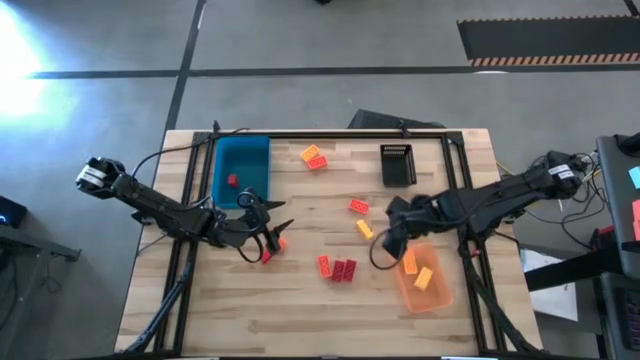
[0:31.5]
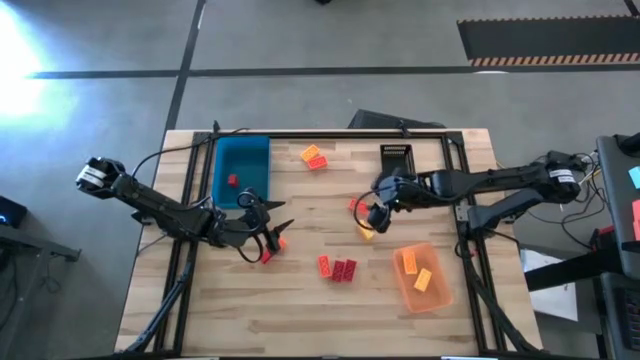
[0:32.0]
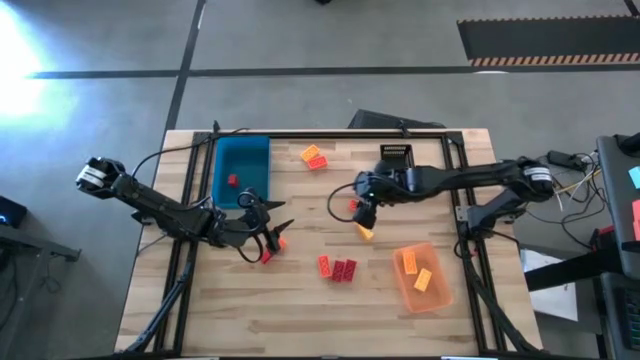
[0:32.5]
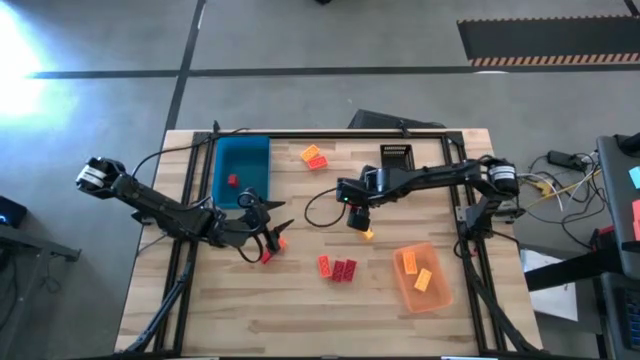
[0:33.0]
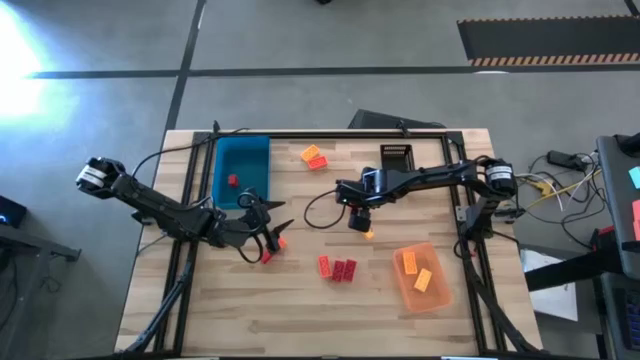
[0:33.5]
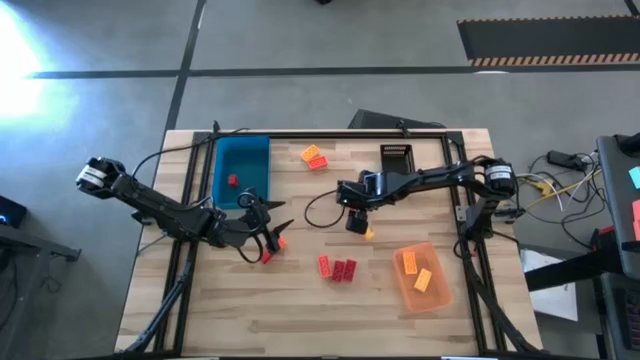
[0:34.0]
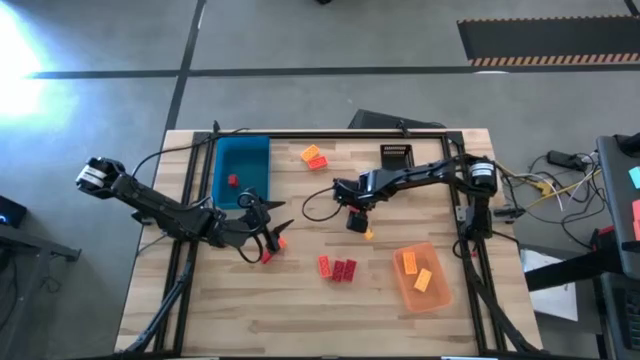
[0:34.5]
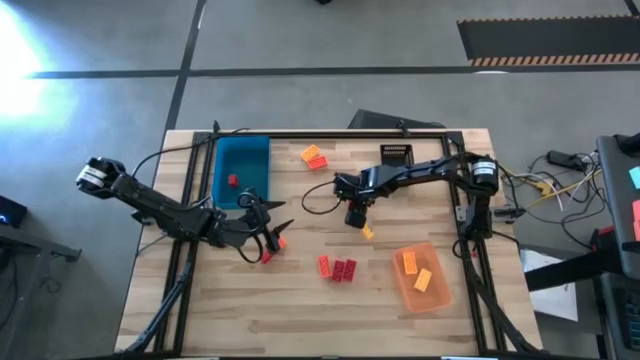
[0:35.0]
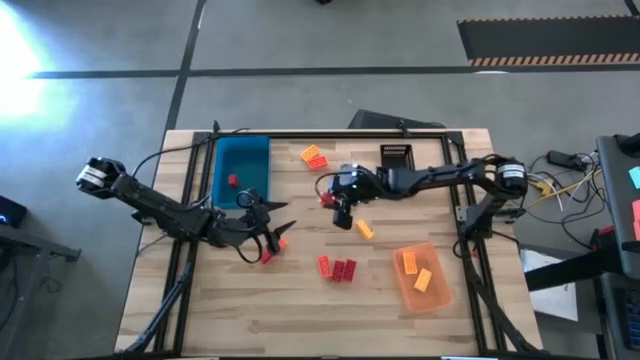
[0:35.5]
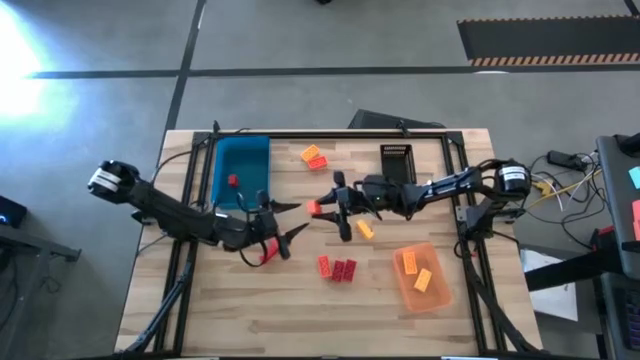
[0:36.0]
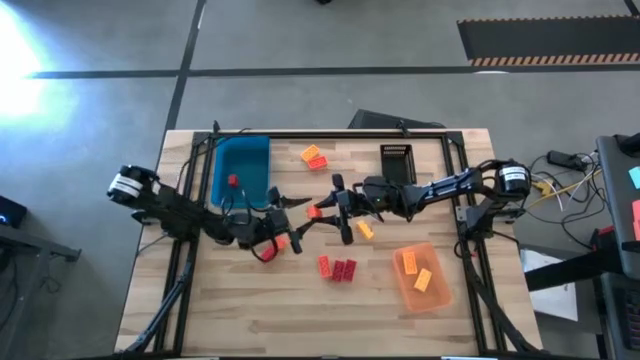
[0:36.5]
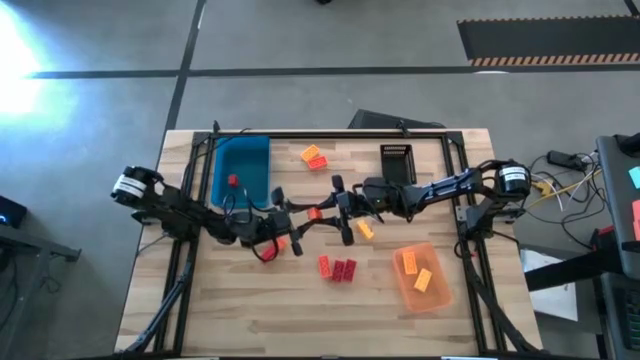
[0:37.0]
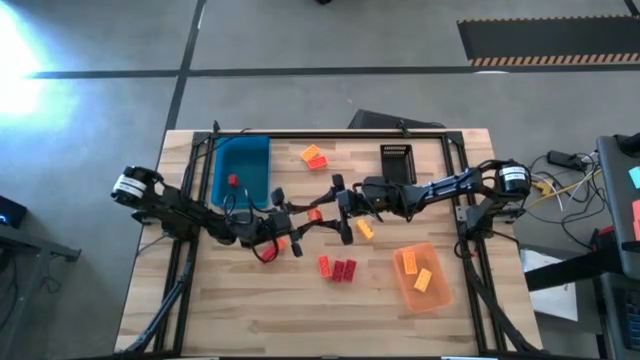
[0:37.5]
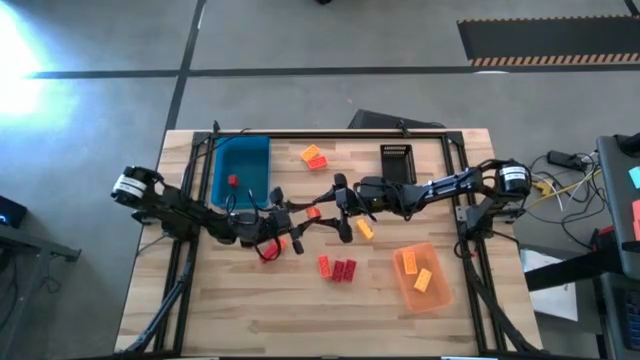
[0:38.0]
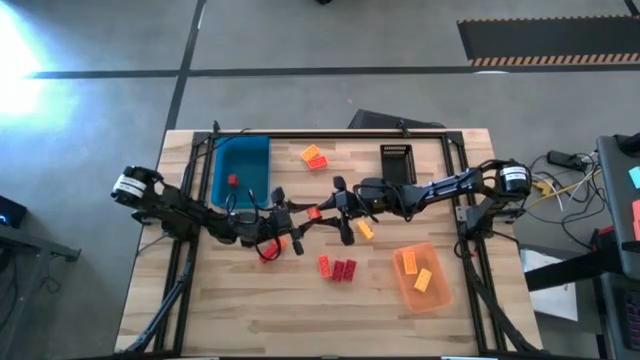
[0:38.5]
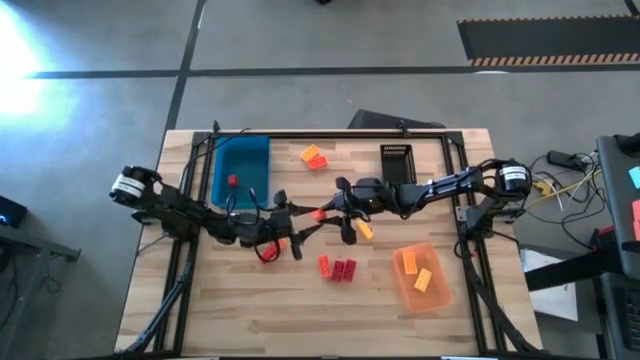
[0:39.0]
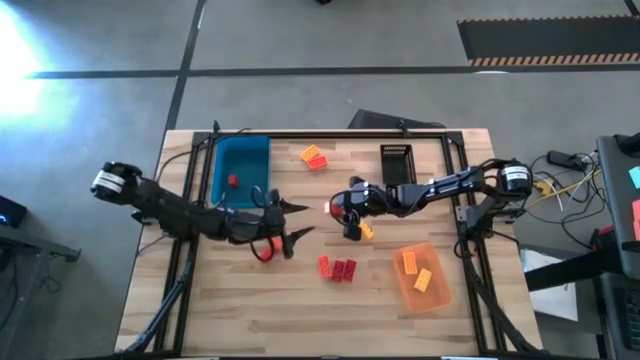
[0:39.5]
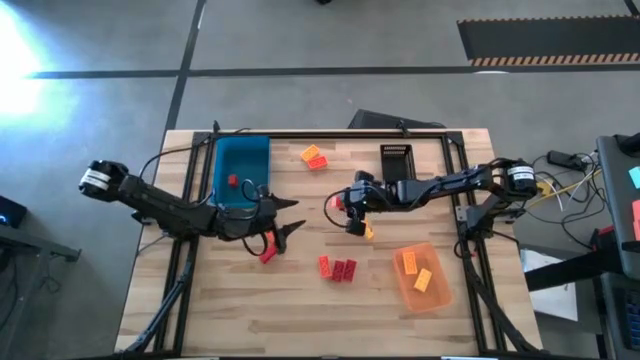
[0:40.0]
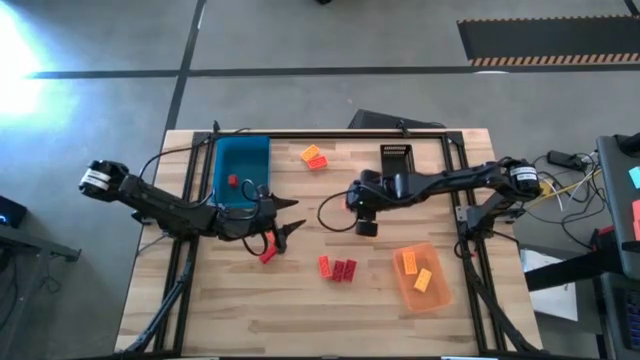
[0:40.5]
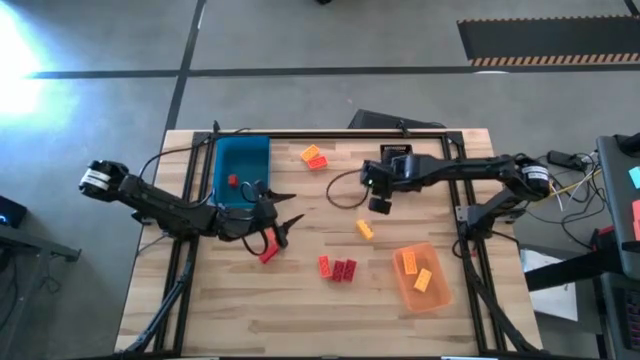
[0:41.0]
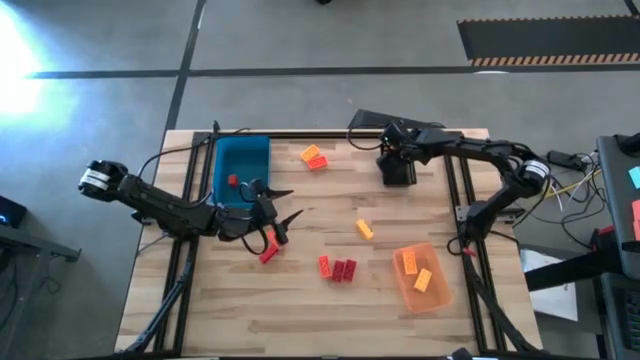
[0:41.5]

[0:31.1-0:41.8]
Task: Sort & place blocks by color
Put the orange game piece into the black bin

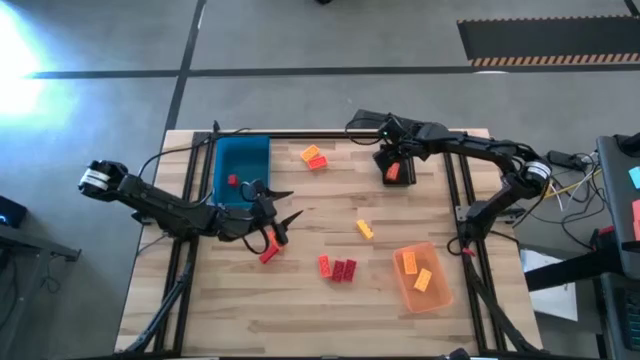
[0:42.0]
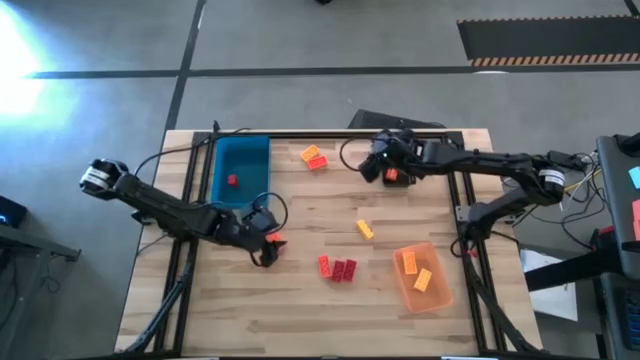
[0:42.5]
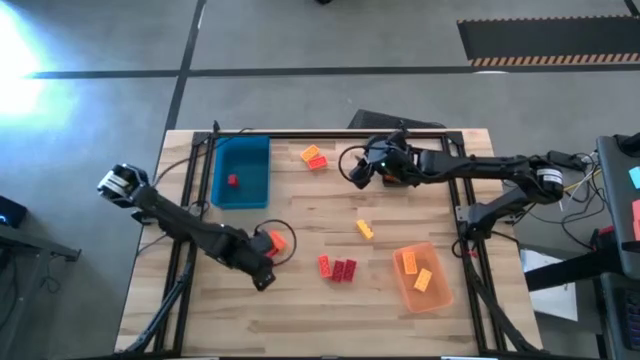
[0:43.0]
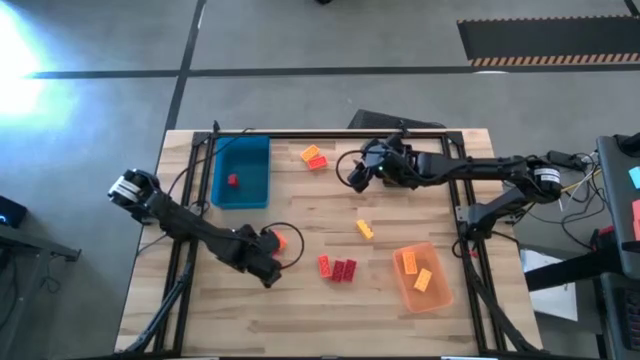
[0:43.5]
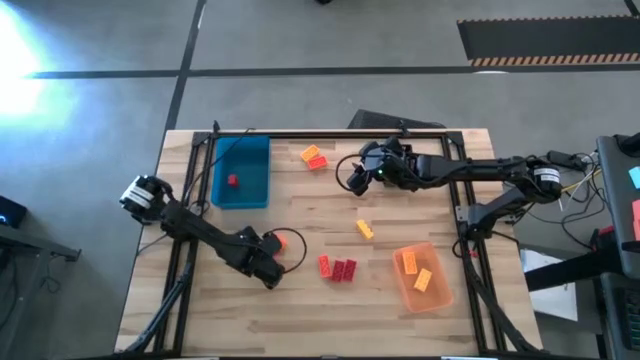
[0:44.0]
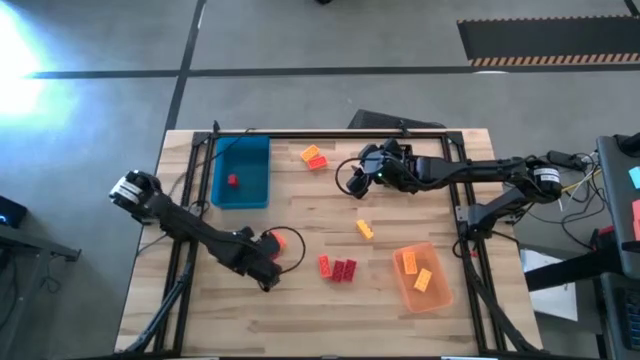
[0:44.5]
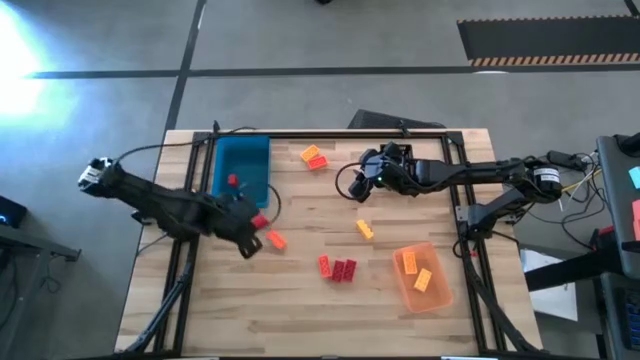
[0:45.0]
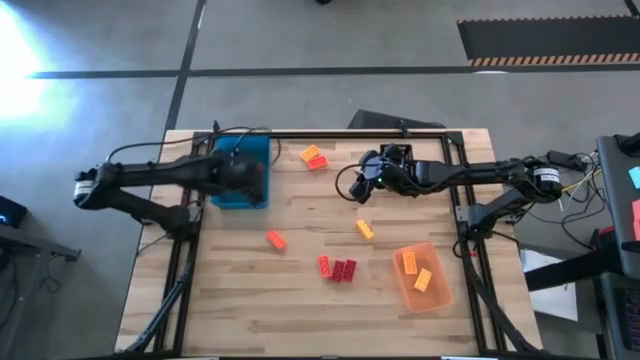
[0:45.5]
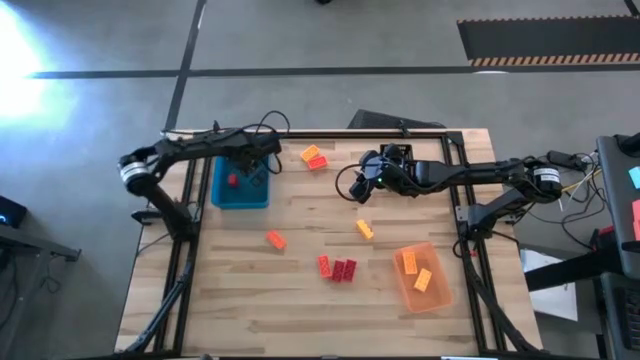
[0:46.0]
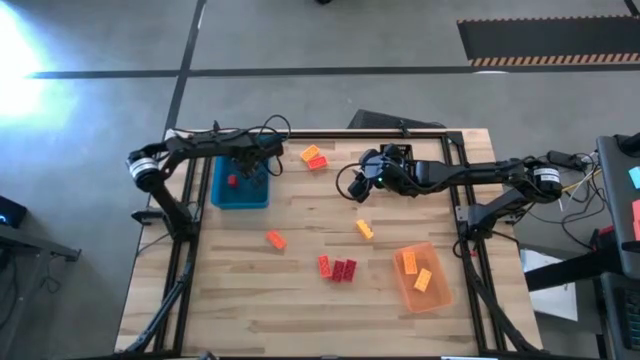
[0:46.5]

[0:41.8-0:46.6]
Put the red game piece into the blue bin

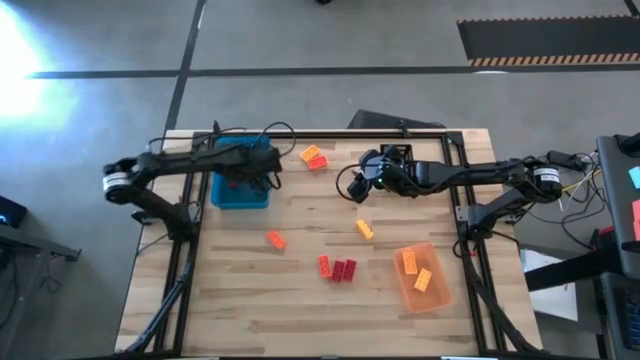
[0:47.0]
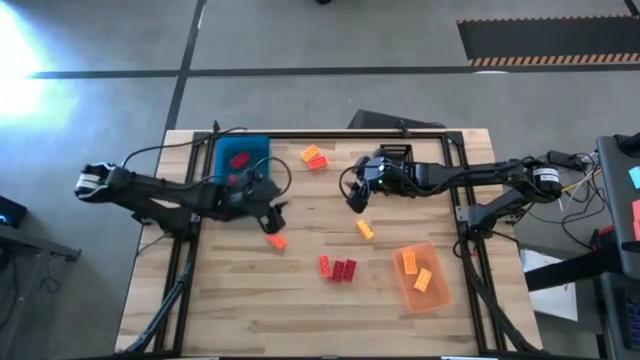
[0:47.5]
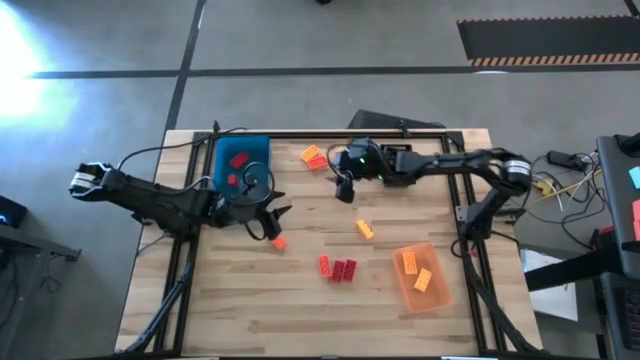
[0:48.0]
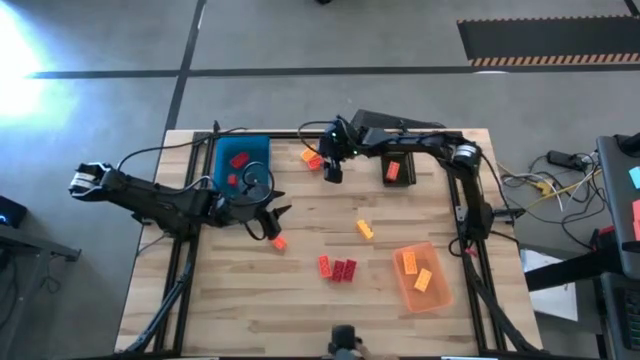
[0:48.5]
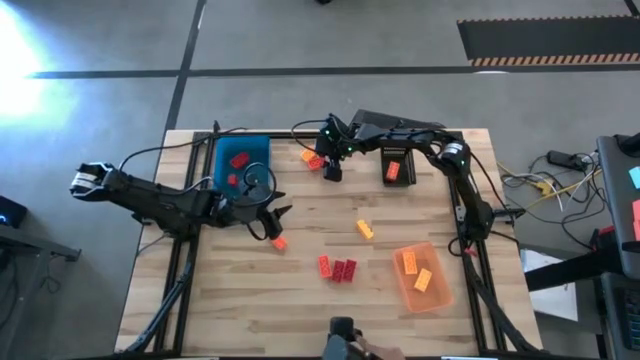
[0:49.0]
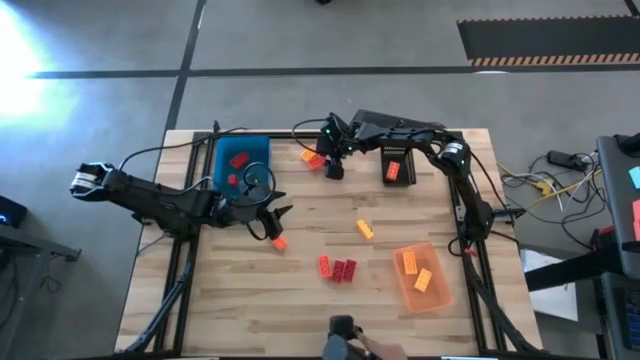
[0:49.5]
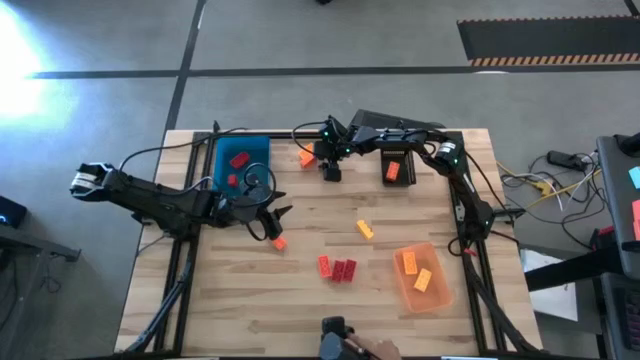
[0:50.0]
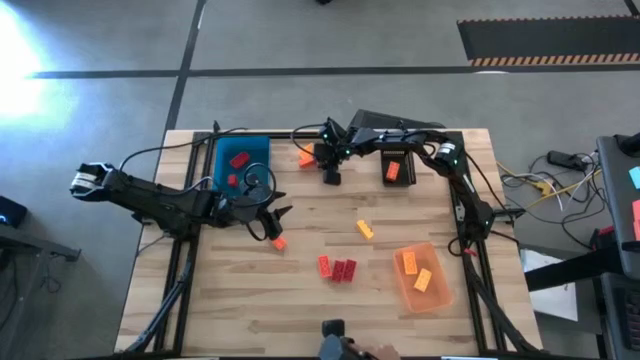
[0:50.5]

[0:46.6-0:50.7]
Put the orange game piece into the black bin

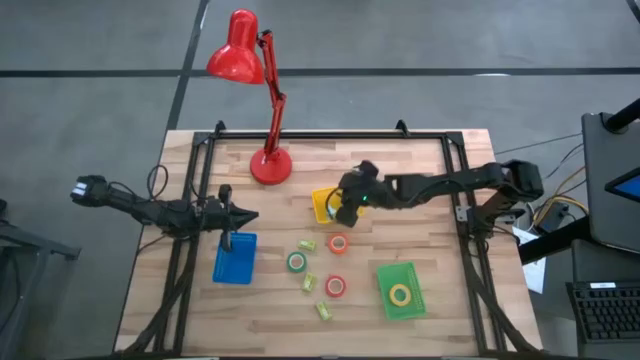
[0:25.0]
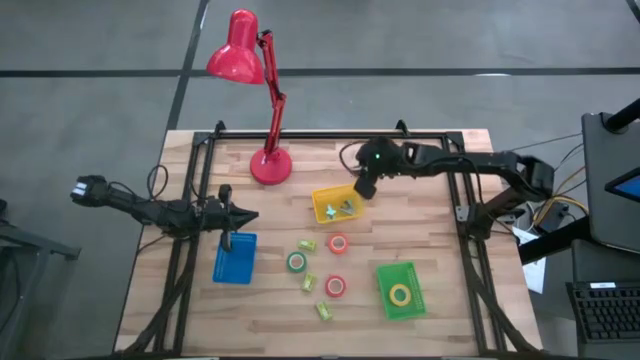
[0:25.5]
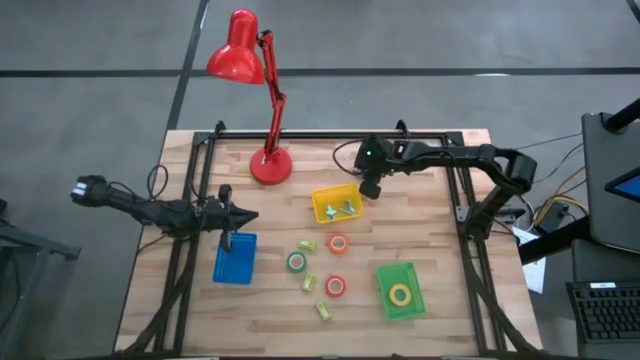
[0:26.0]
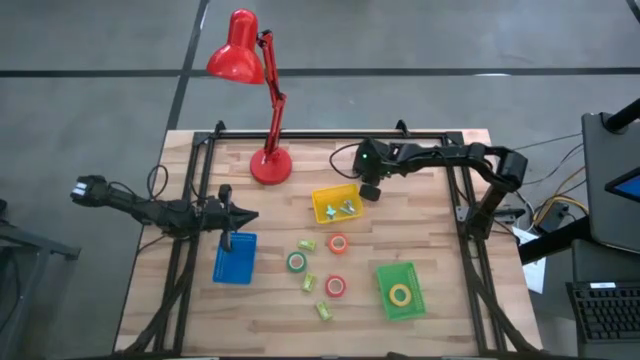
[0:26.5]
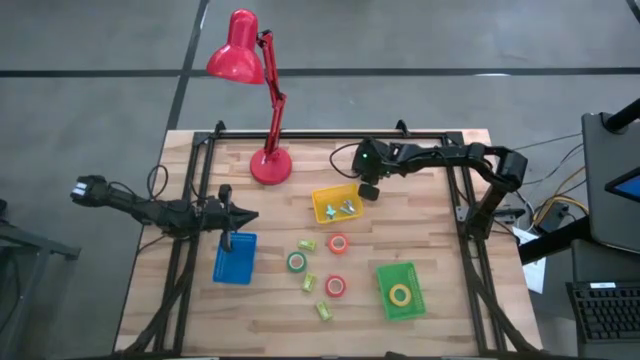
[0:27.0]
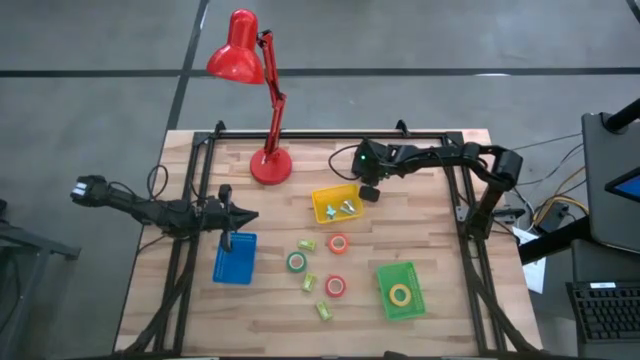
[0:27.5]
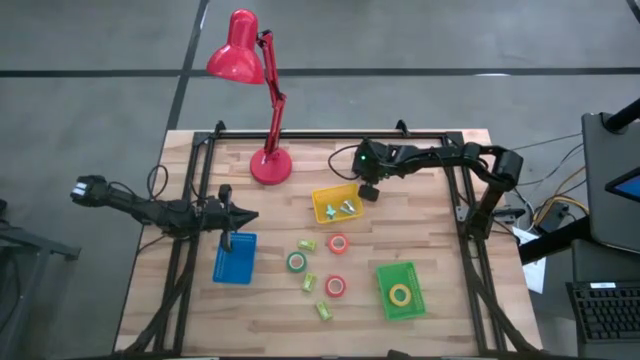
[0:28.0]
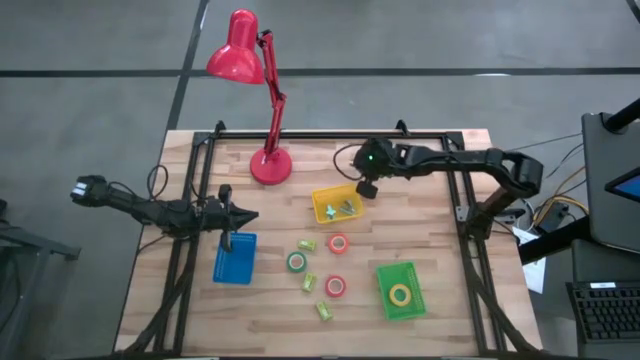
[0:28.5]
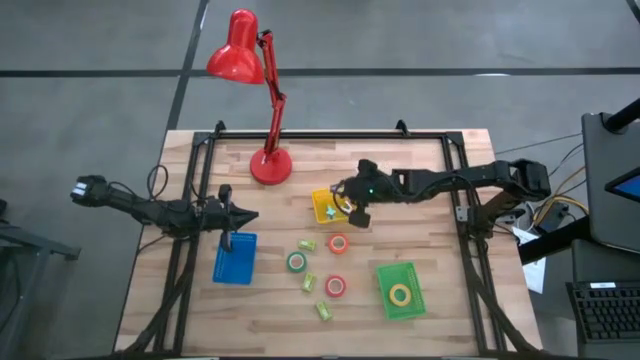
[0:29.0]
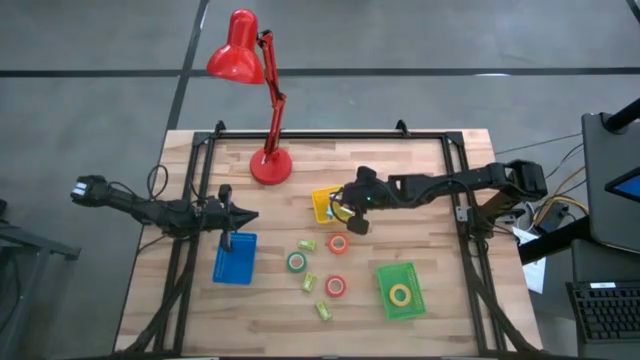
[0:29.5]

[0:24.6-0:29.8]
Task: Pick and place Stapler, Stapler remover, tape
Put the black staple remover into the yellow bin
